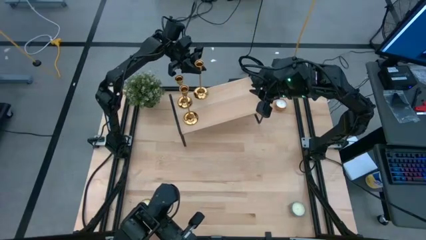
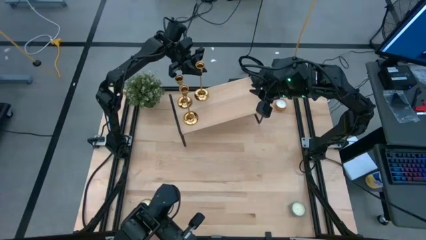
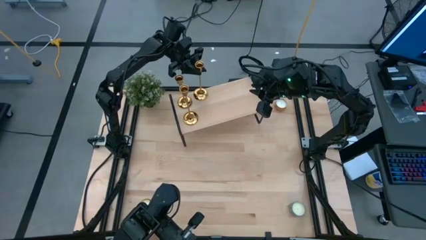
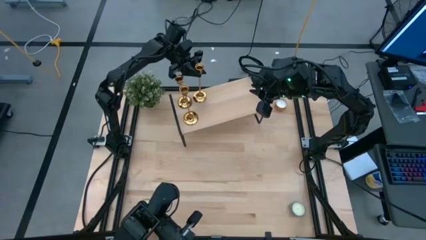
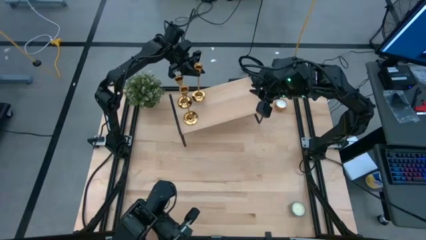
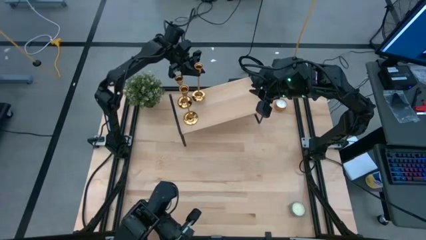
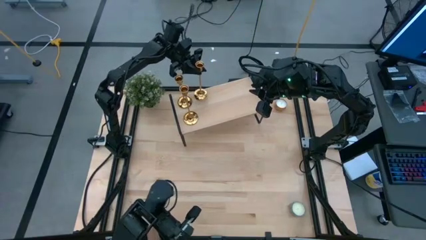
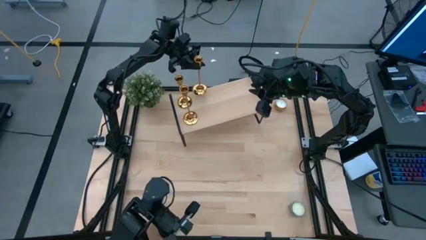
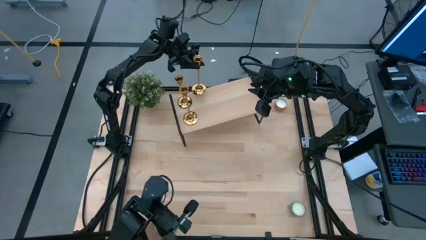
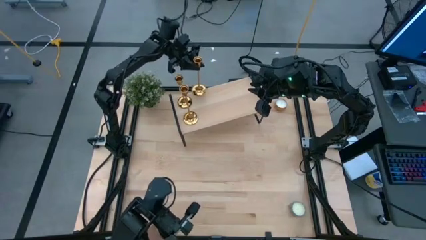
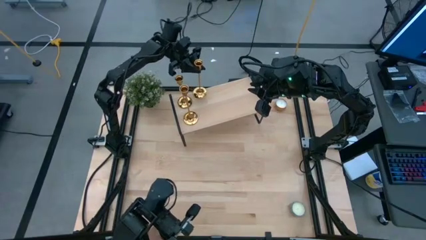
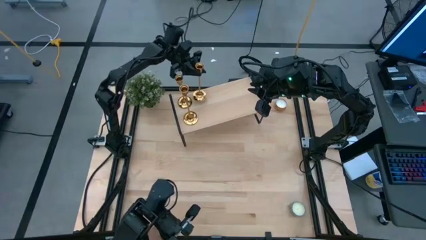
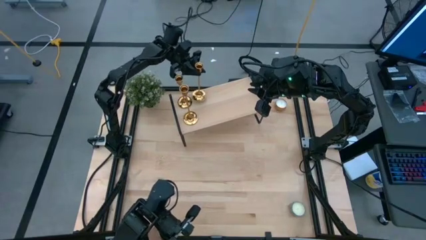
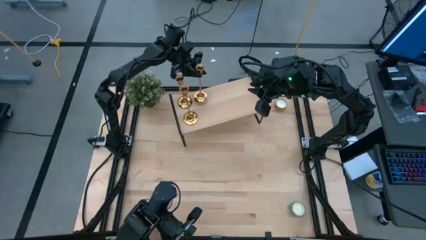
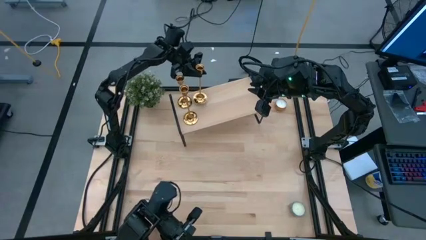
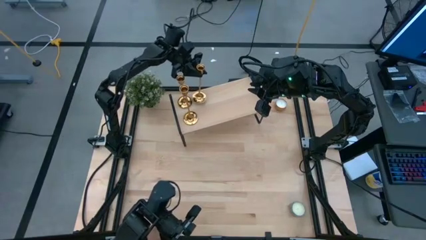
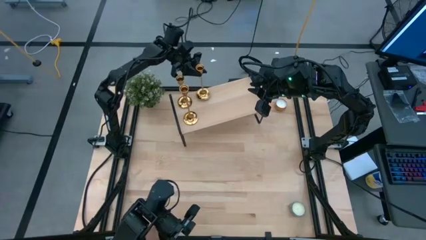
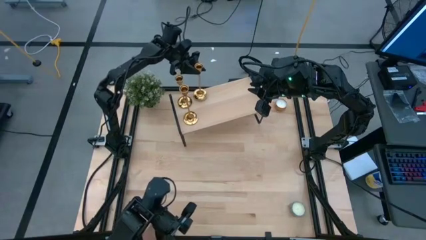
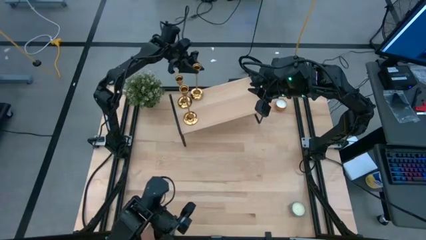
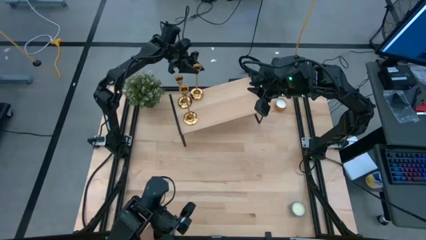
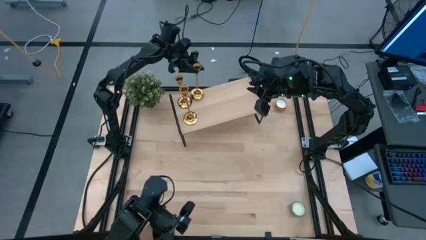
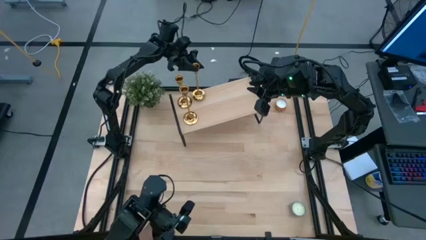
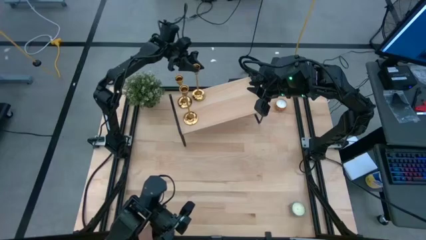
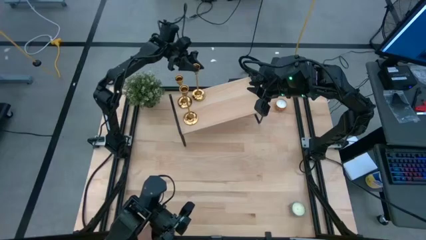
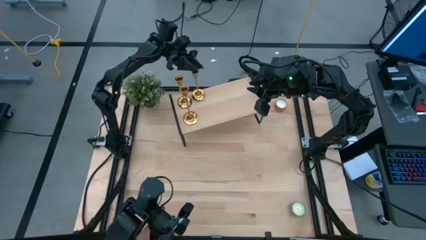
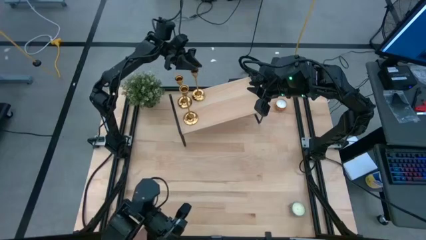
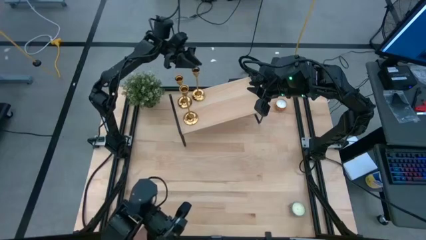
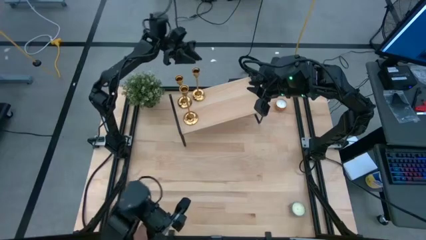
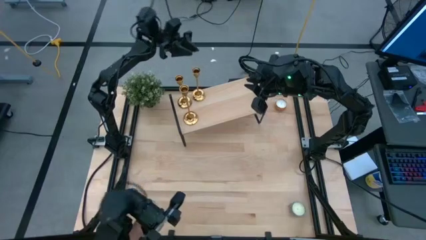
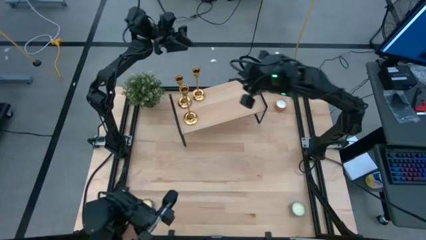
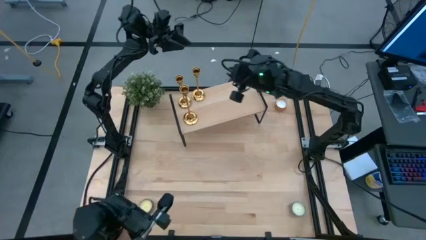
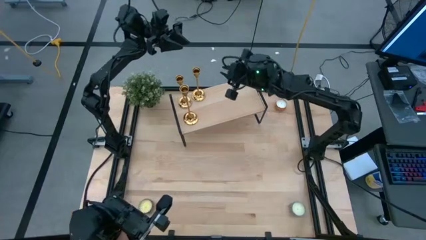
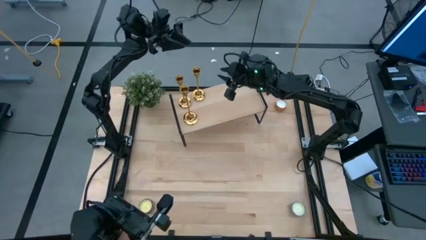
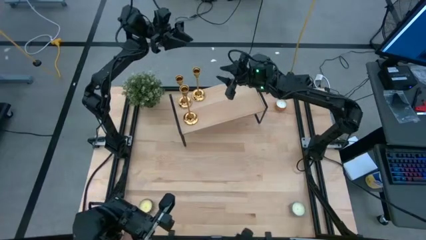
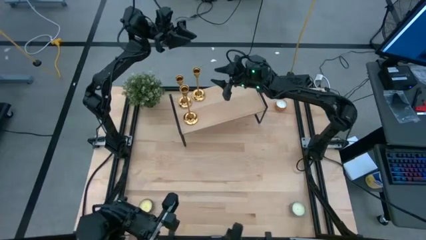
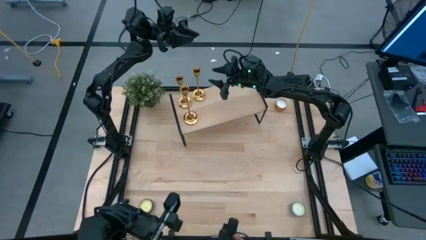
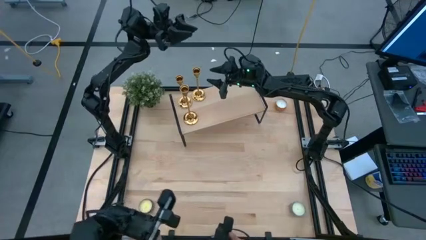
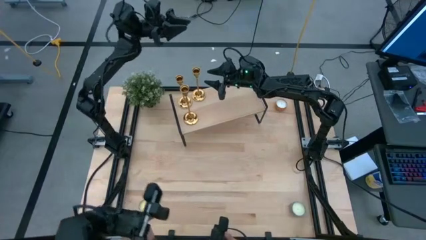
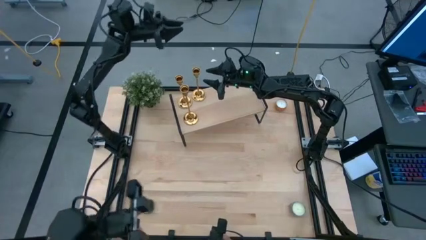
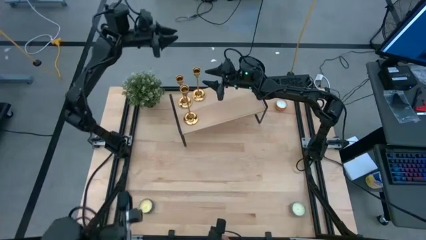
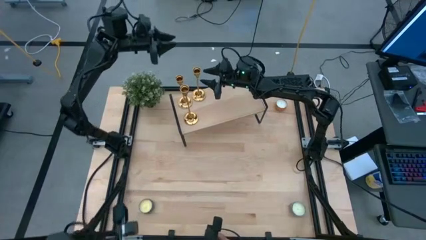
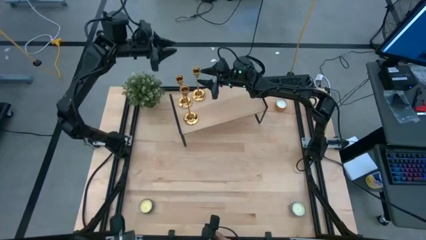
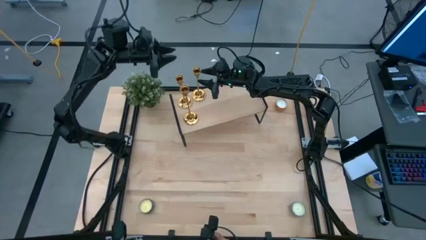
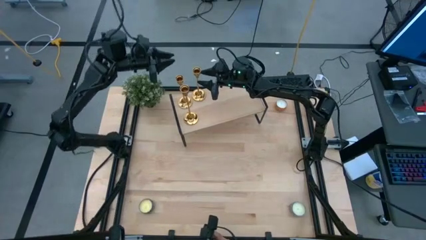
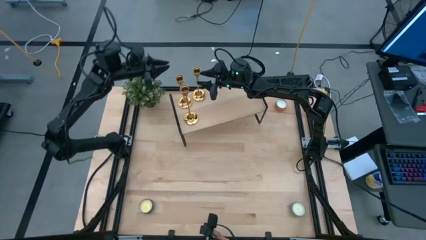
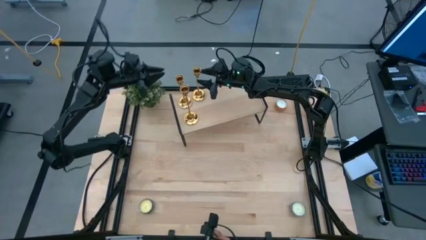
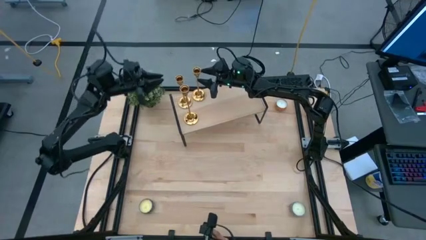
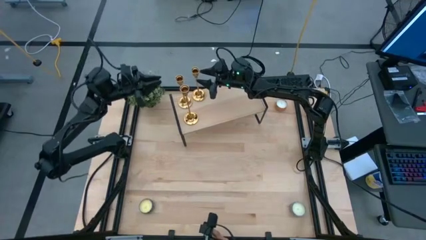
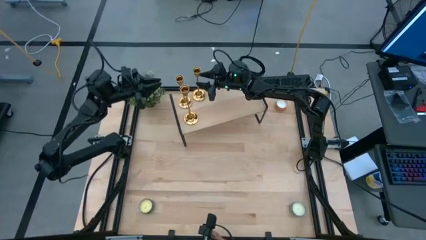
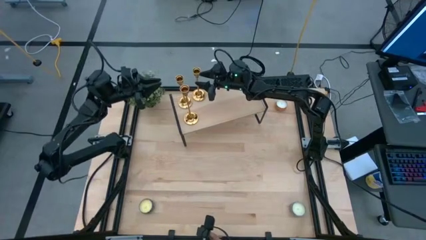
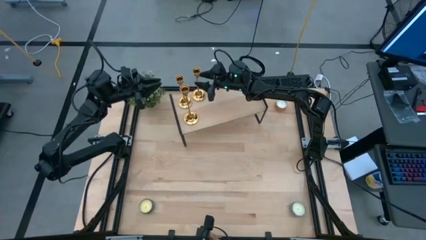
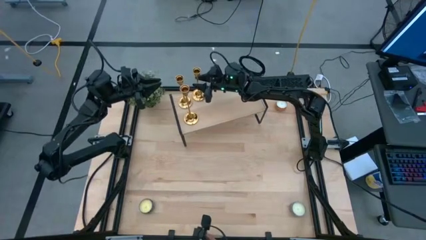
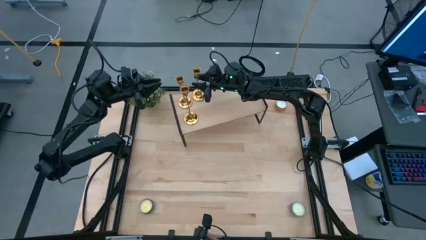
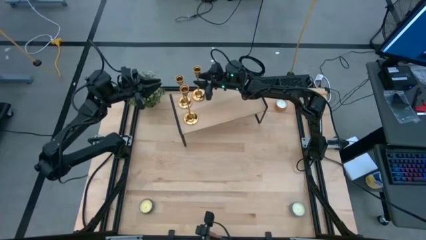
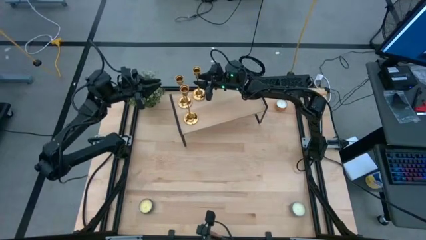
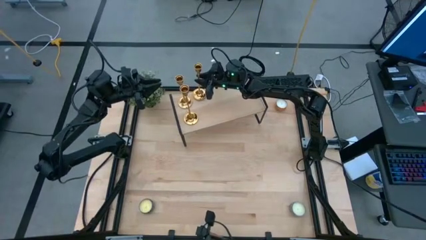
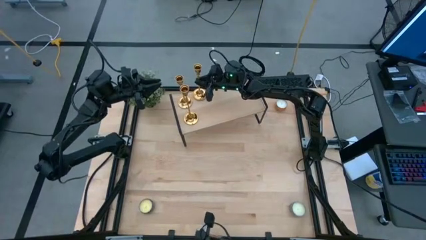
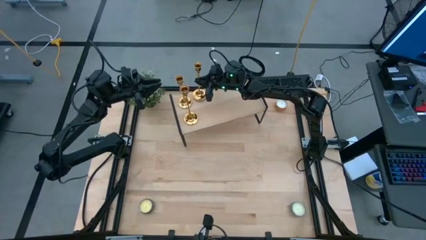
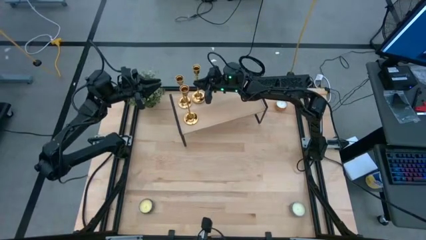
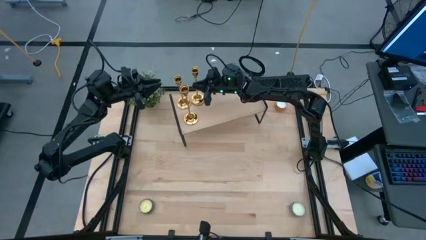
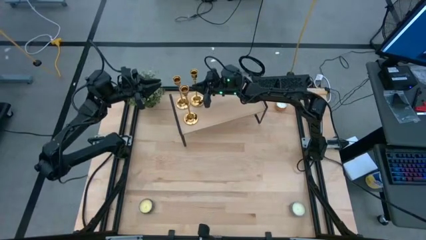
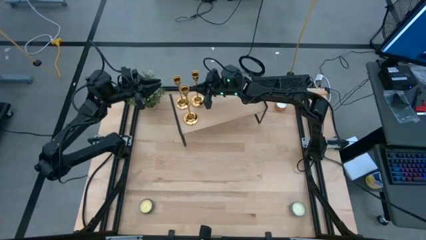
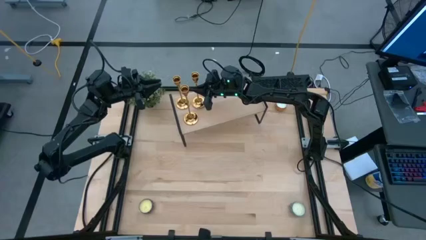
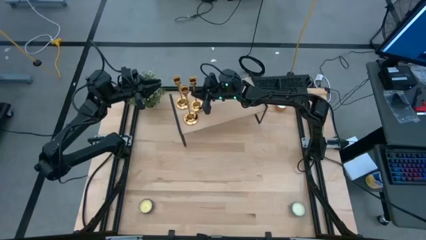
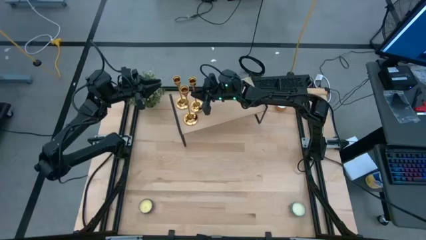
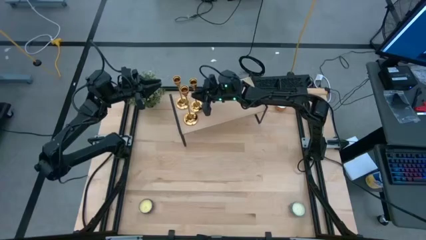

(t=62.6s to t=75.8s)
Task: Pick & Place candle stick holders
Put the gold candle holder on the shelf
